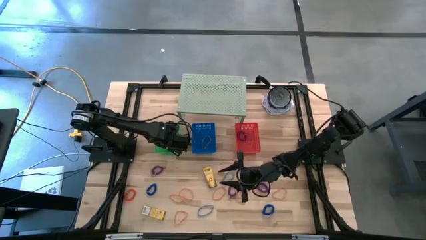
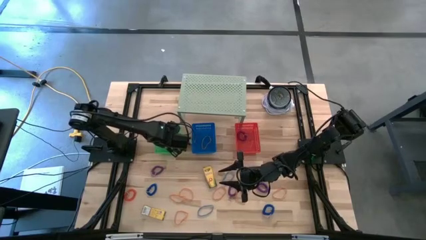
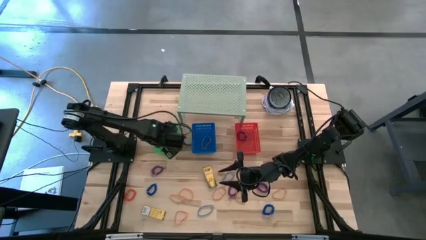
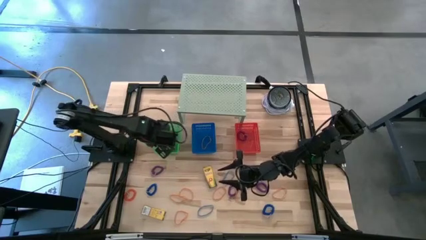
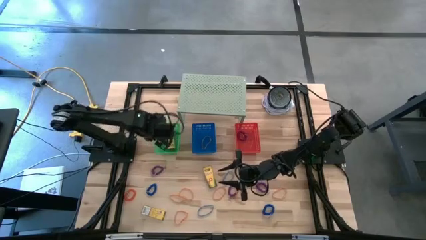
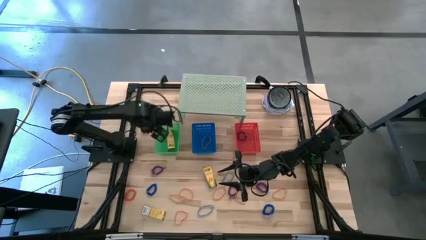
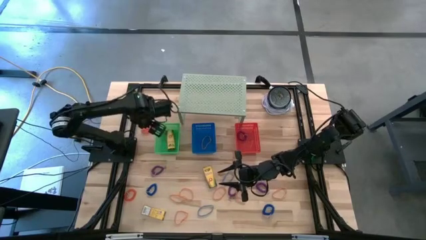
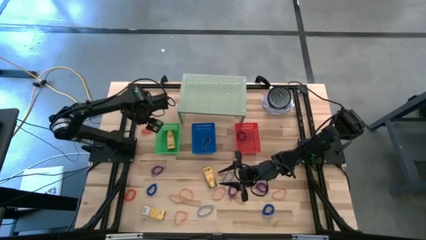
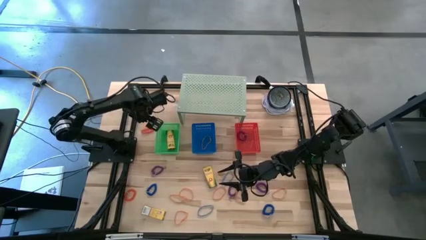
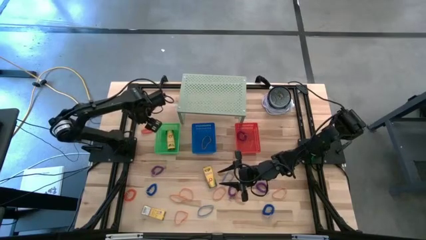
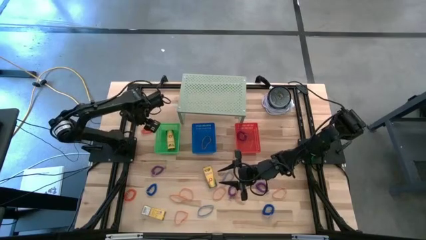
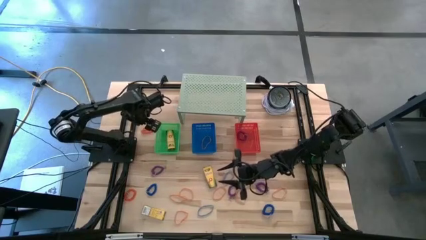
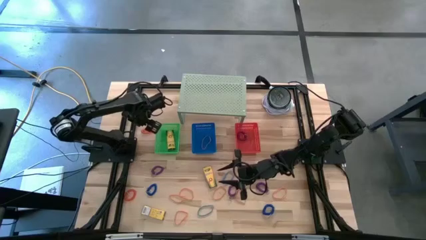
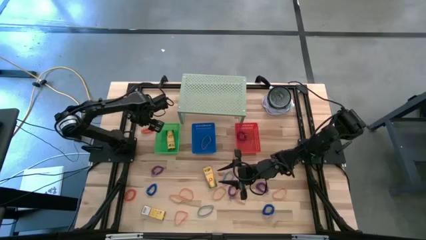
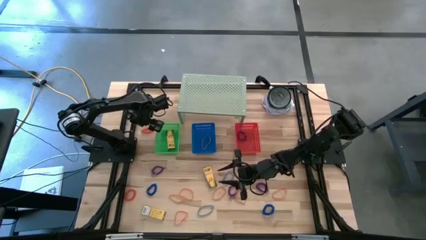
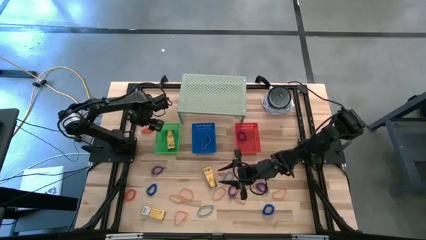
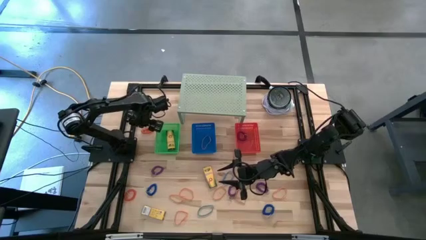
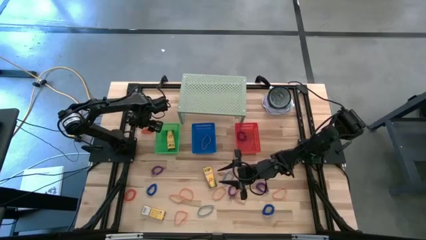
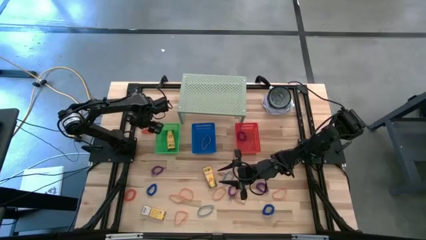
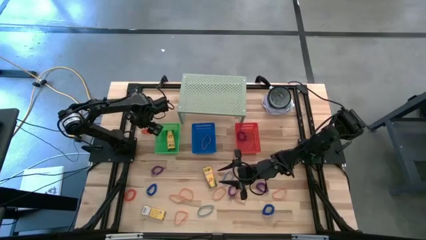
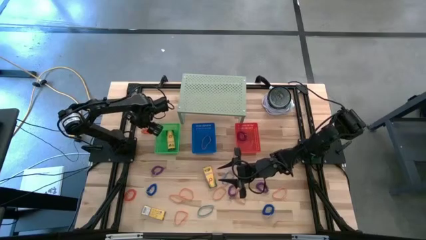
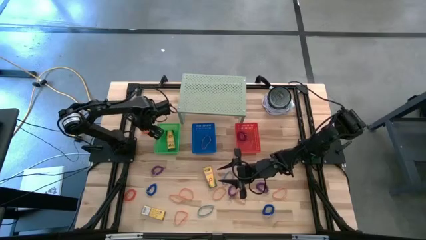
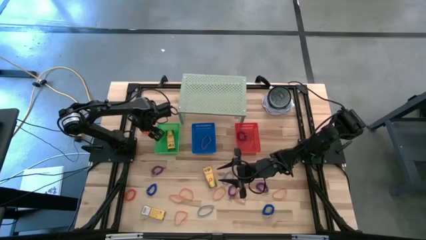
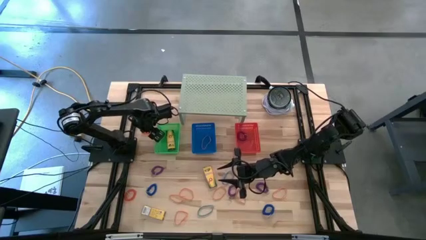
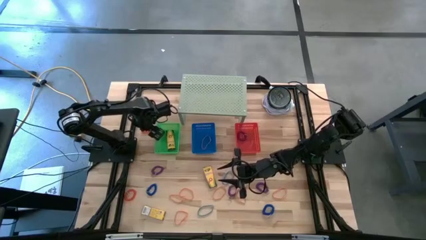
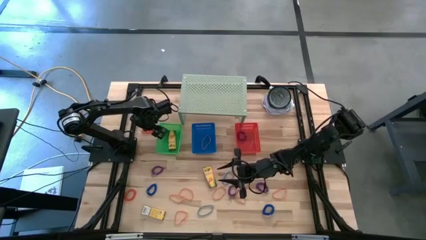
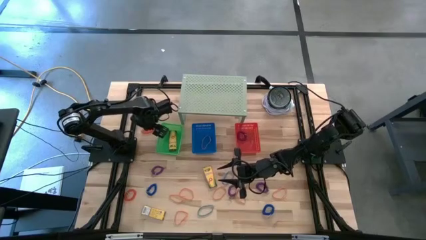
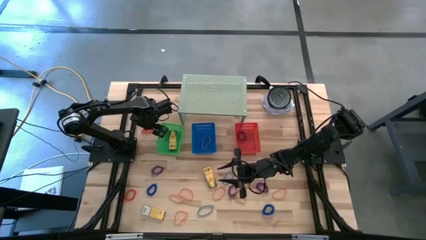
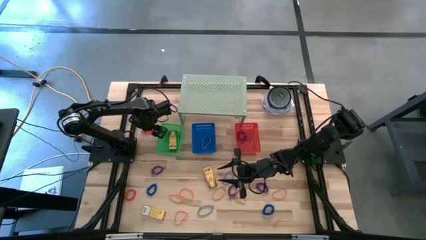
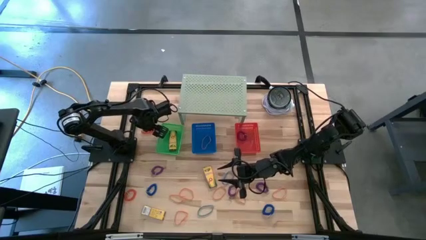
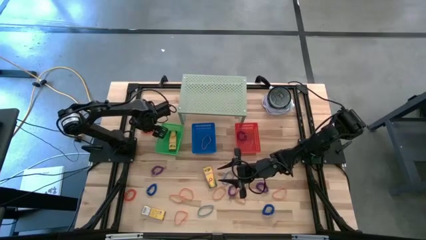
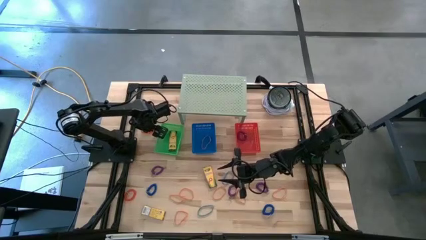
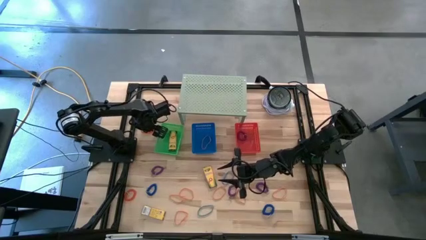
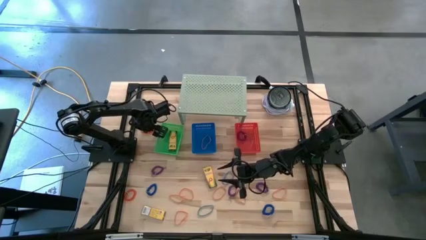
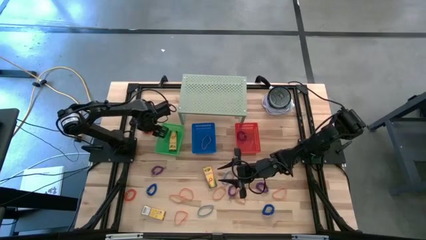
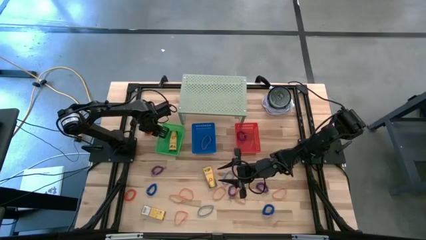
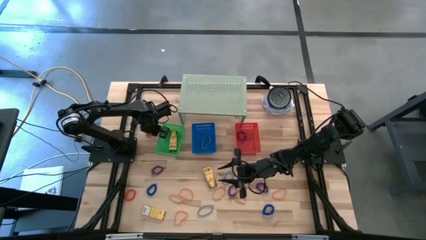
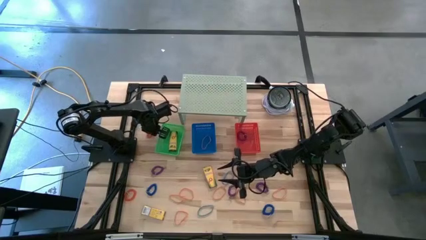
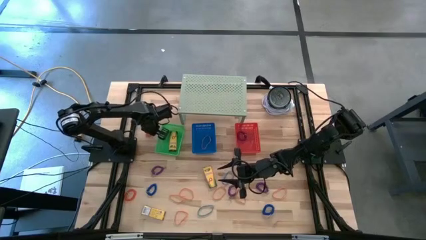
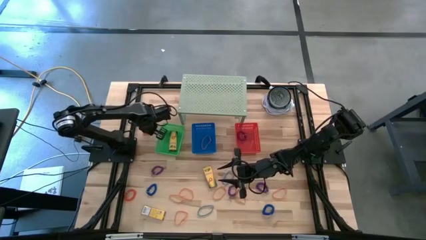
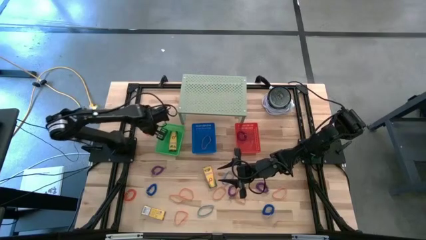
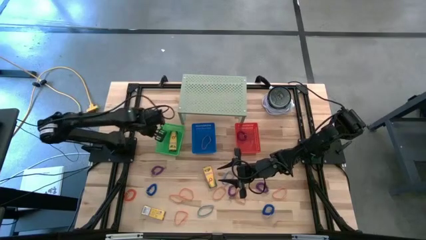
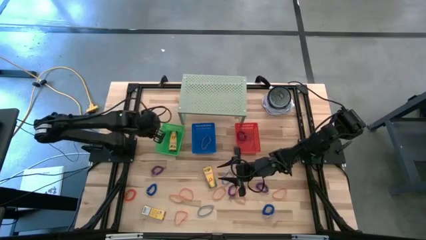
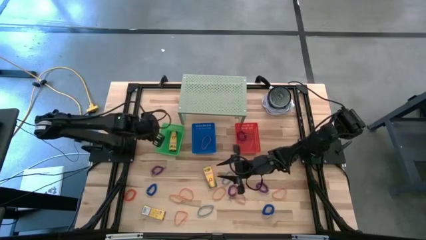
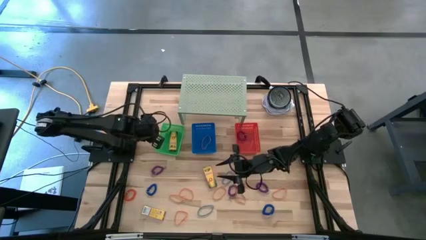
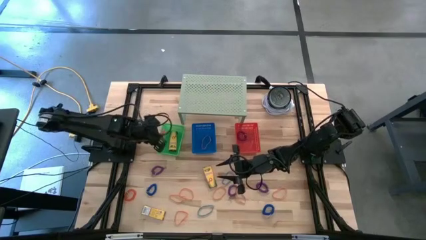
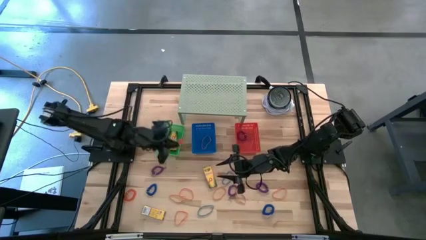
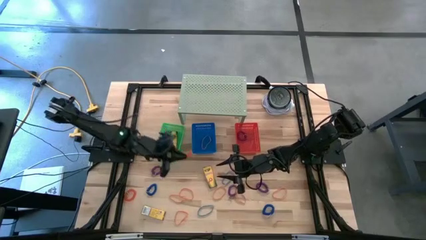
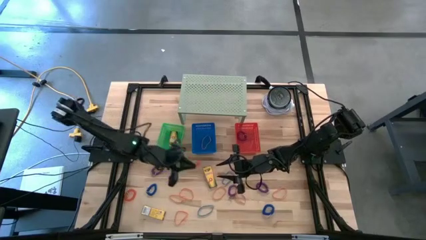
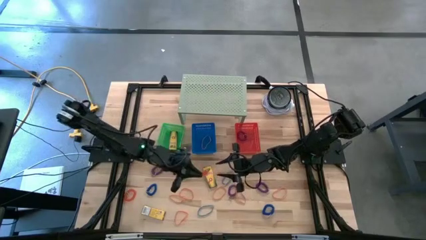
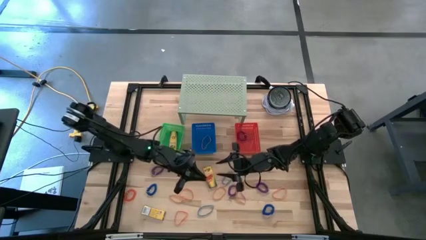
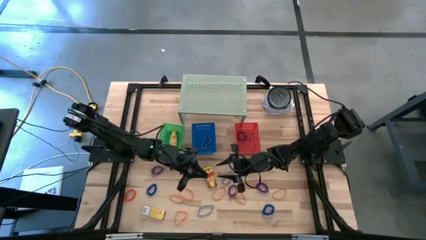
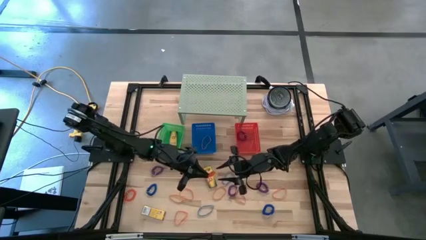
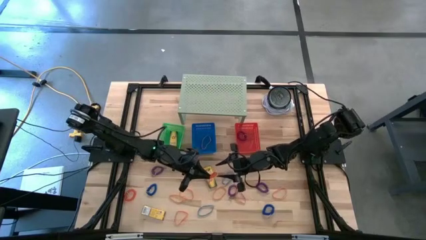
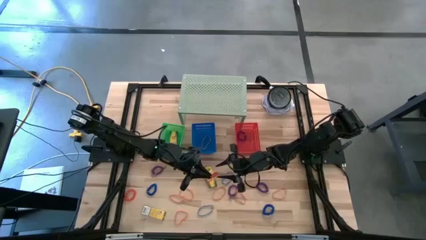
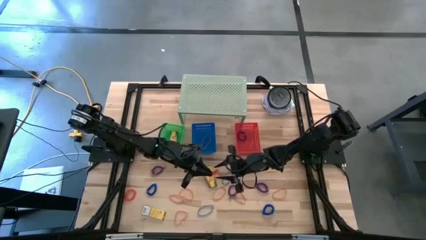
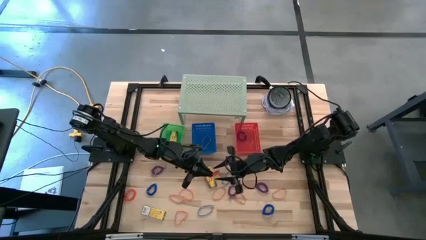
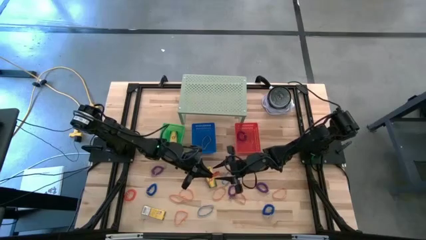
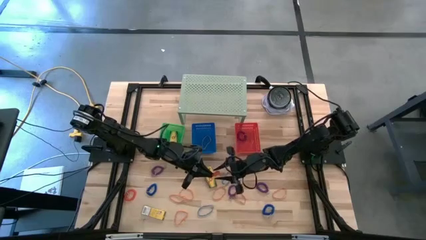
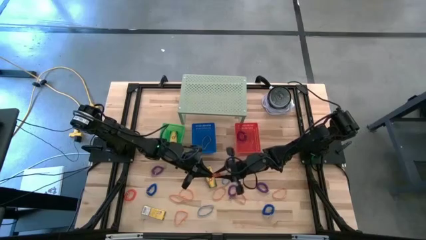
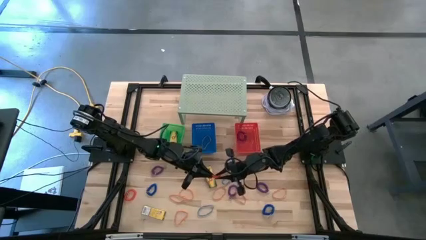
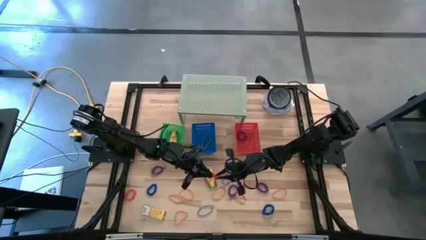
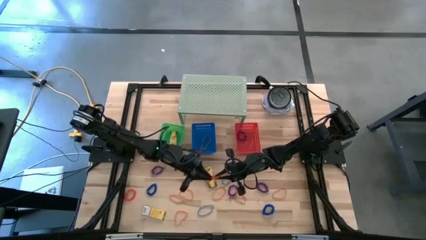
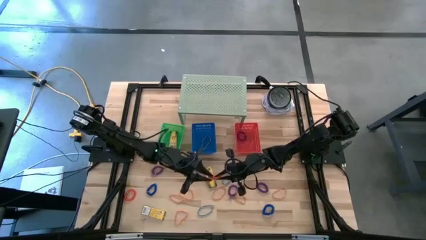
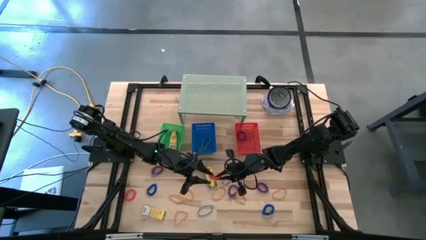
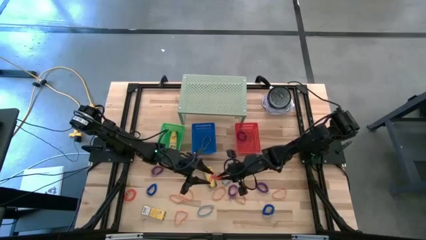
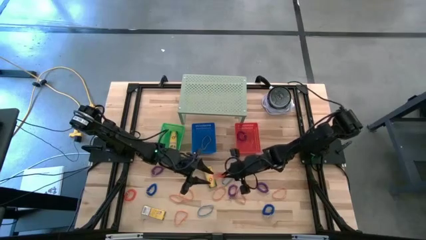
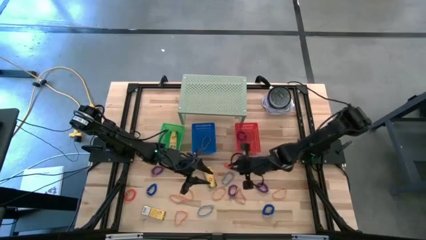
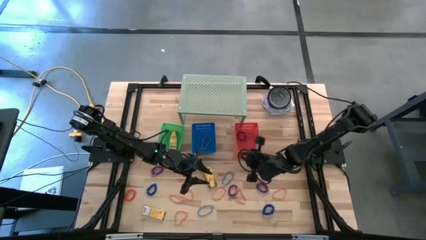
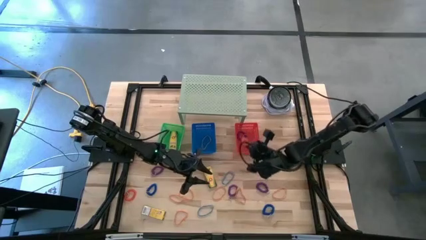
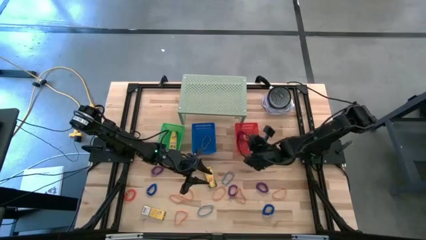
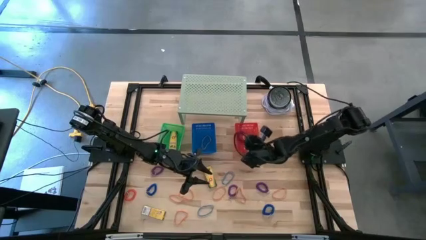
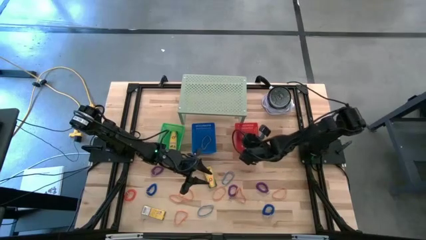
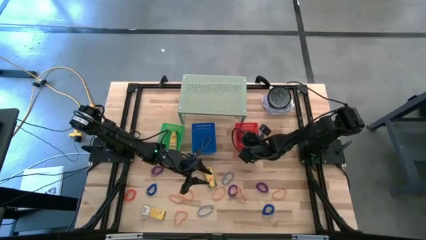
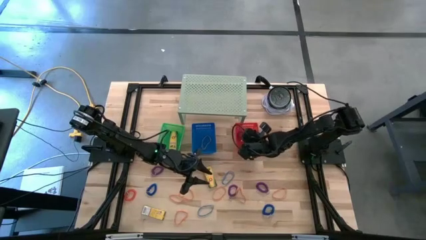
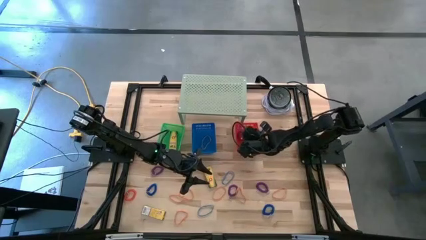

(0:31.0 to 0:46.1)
Task: Pick & Place Office Desk Supplies
Put the orange spring keychain into the red bin

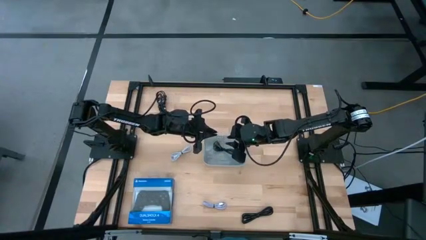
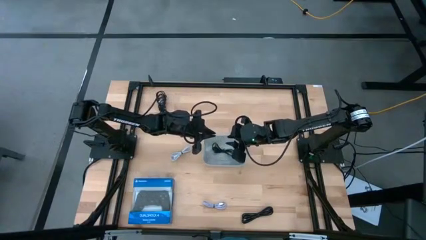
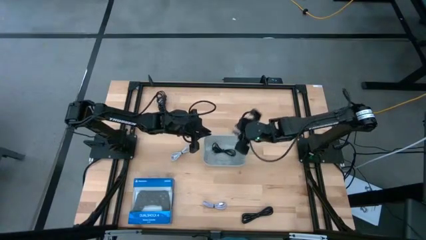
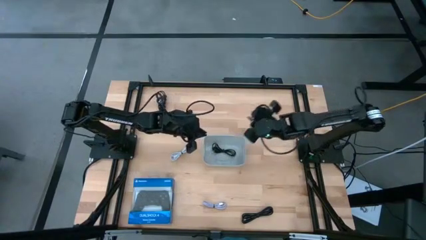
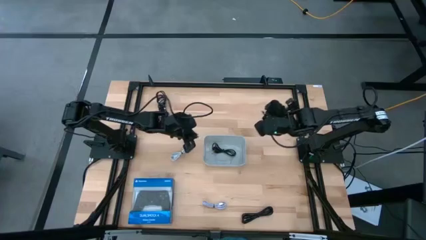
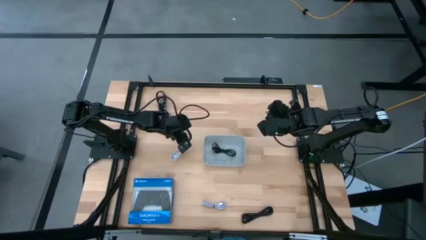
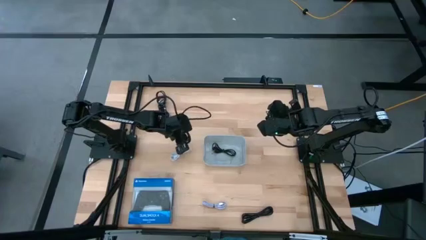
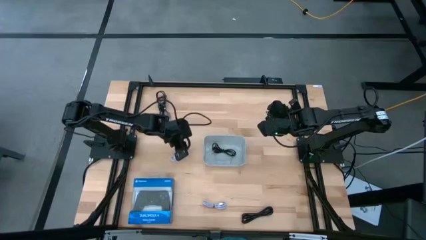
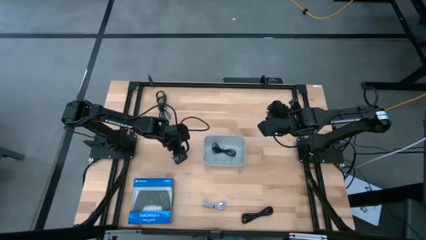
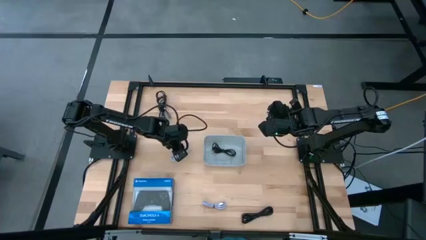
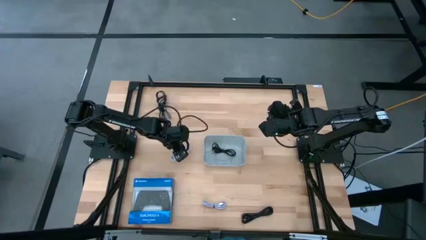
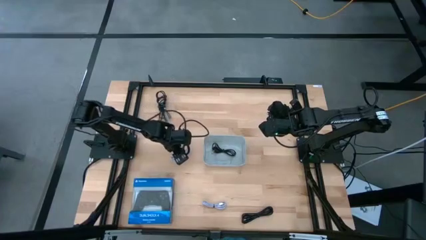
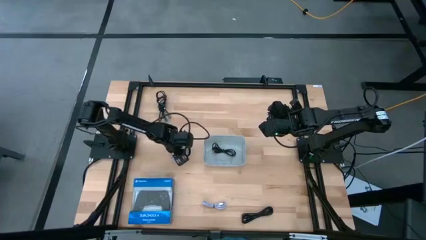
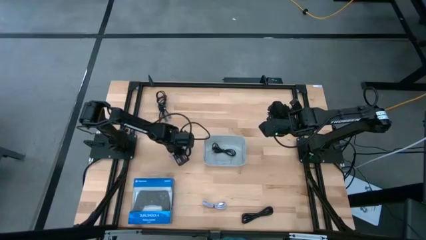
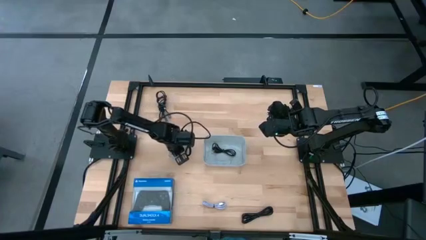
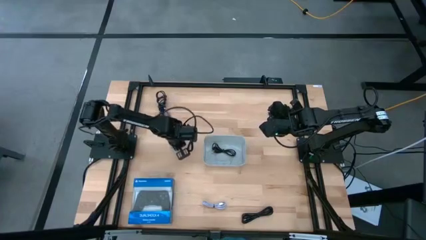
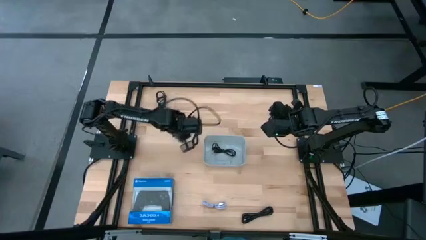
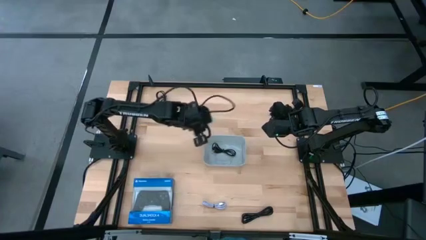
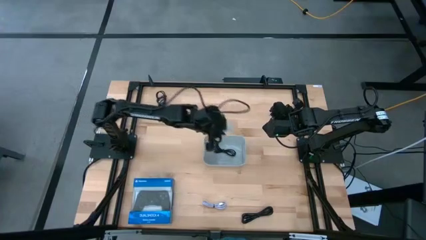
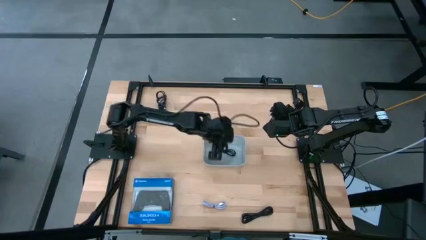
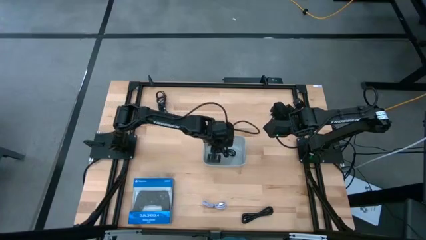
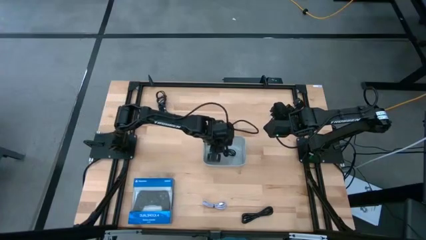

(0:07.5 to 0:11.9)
Task: Pick and place USB-C Cables
Put the white charger cable into the gray bin
